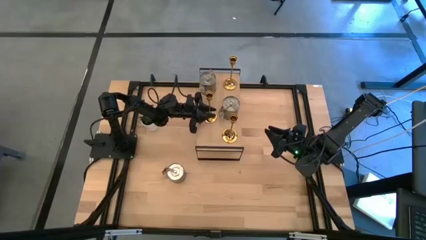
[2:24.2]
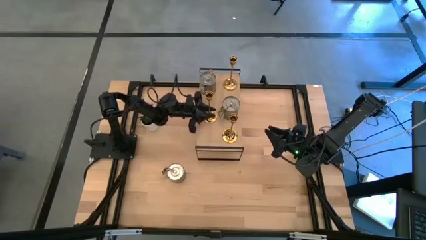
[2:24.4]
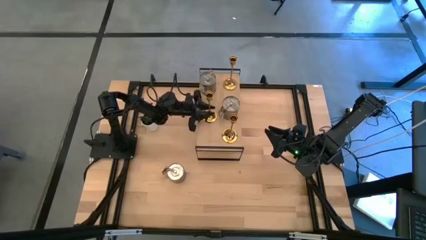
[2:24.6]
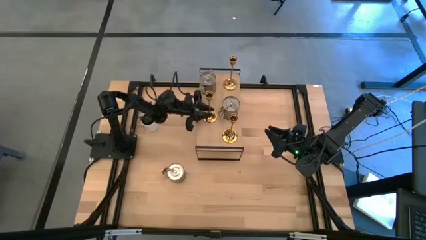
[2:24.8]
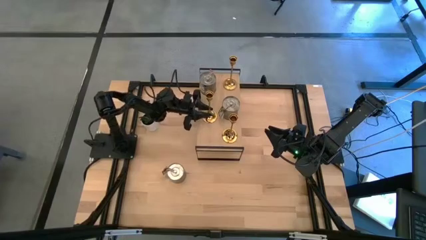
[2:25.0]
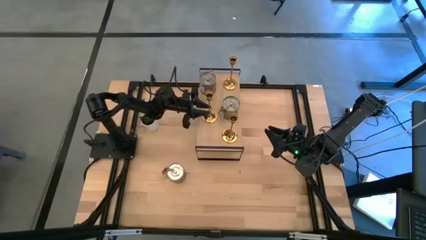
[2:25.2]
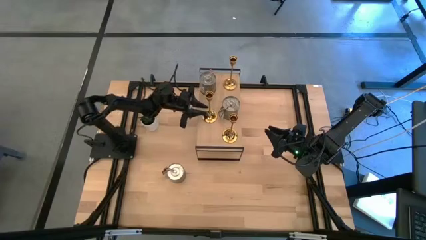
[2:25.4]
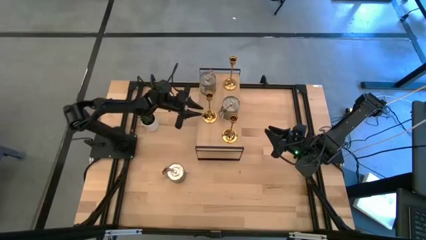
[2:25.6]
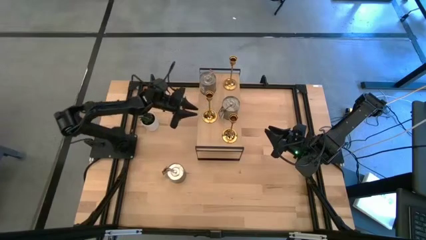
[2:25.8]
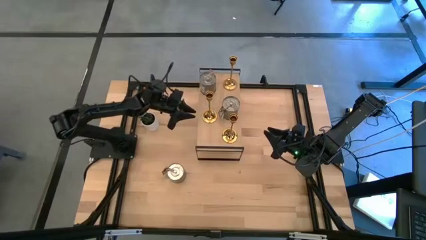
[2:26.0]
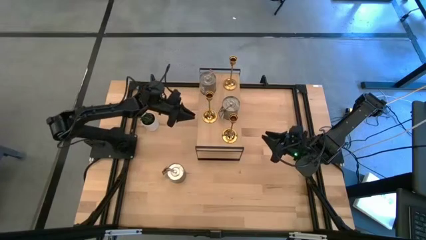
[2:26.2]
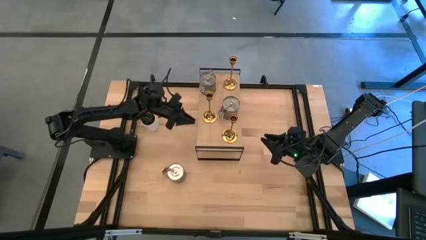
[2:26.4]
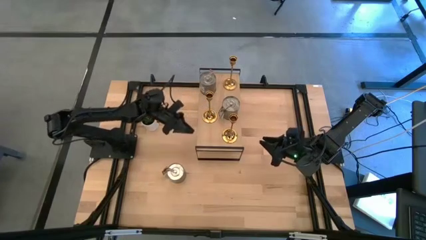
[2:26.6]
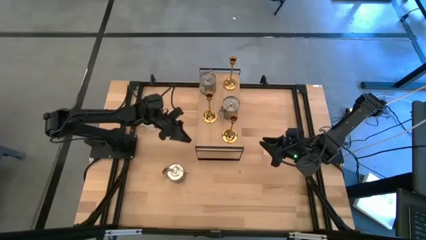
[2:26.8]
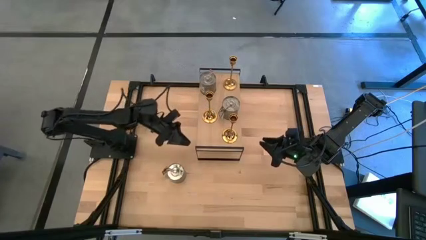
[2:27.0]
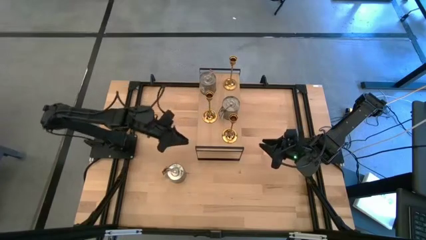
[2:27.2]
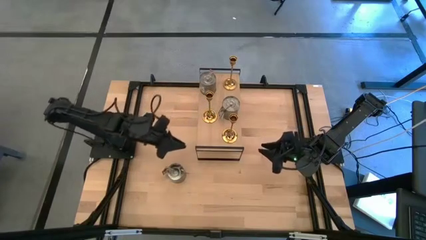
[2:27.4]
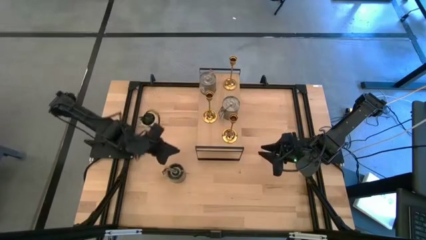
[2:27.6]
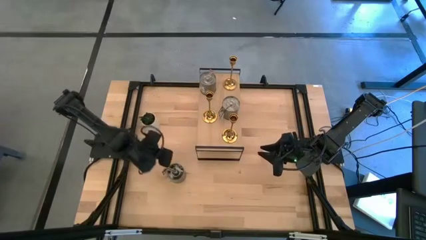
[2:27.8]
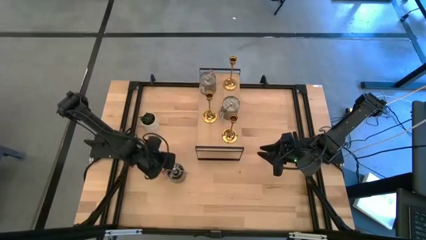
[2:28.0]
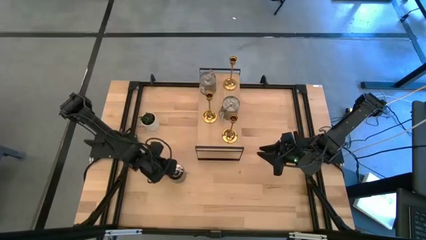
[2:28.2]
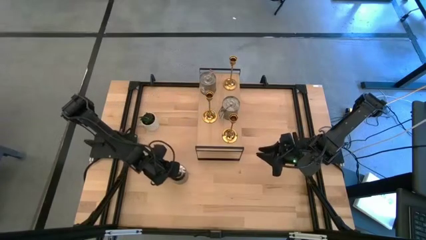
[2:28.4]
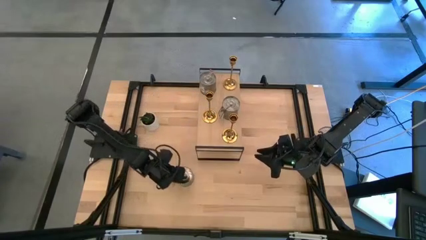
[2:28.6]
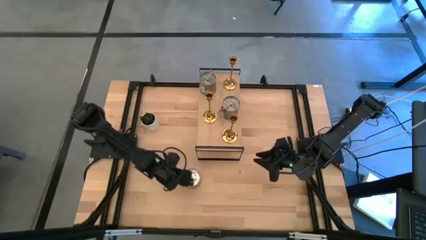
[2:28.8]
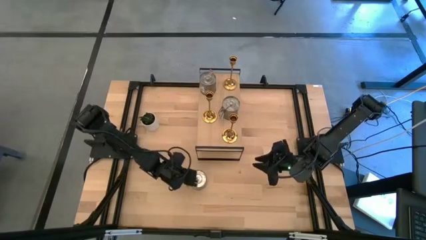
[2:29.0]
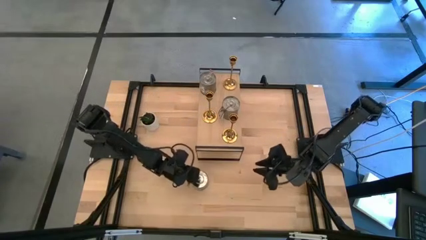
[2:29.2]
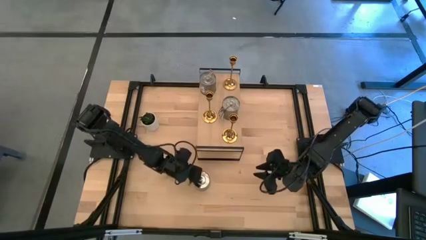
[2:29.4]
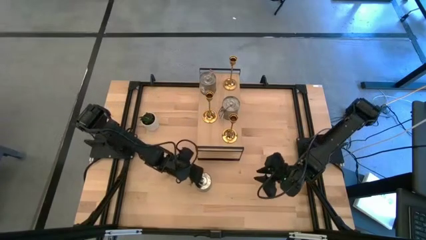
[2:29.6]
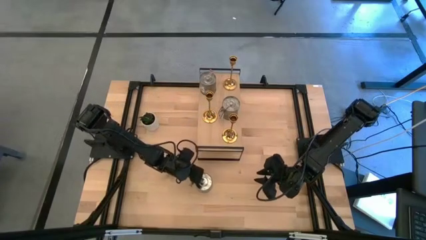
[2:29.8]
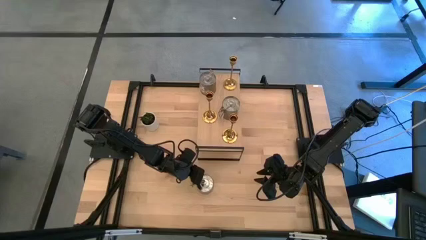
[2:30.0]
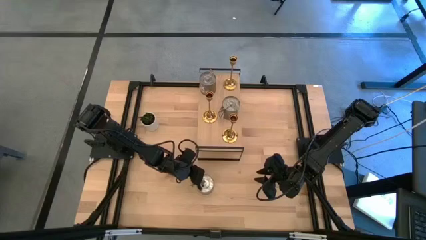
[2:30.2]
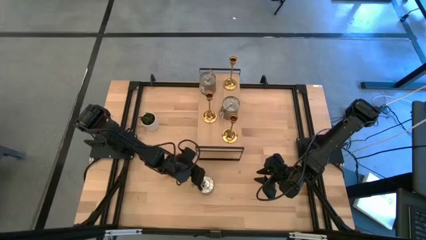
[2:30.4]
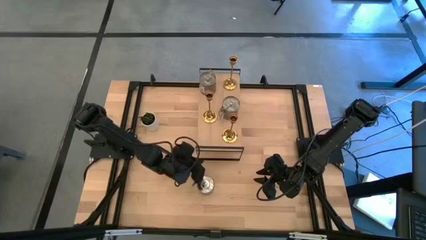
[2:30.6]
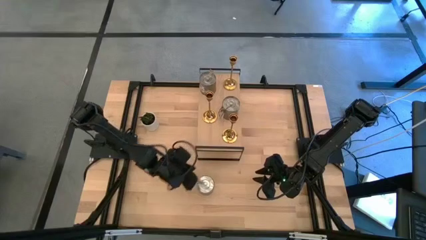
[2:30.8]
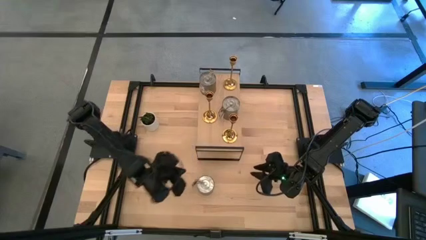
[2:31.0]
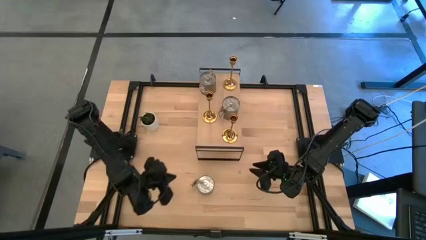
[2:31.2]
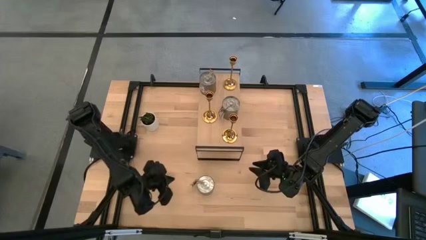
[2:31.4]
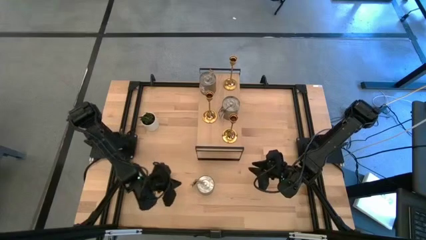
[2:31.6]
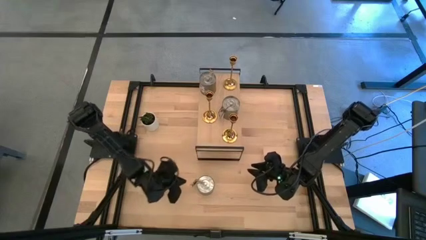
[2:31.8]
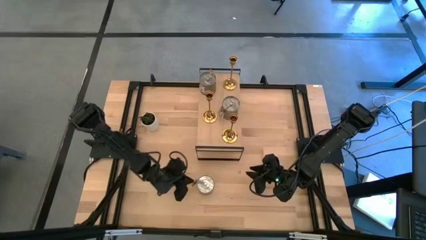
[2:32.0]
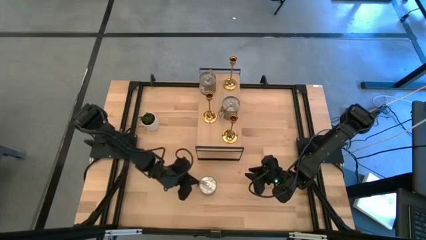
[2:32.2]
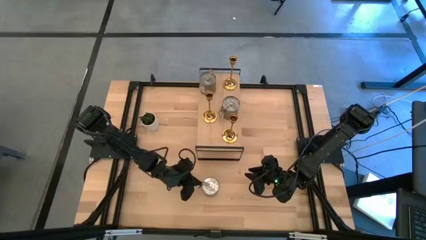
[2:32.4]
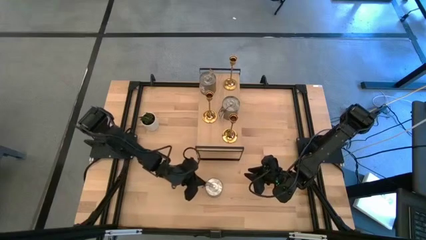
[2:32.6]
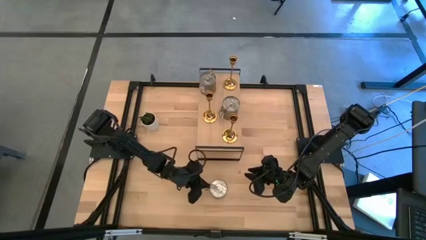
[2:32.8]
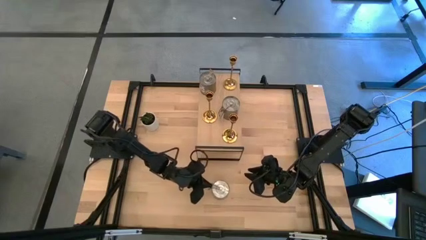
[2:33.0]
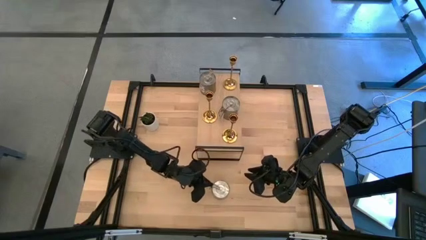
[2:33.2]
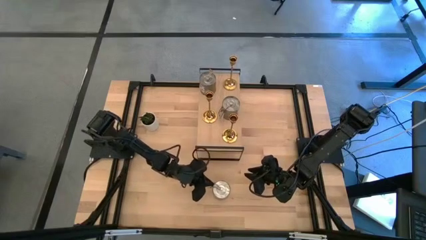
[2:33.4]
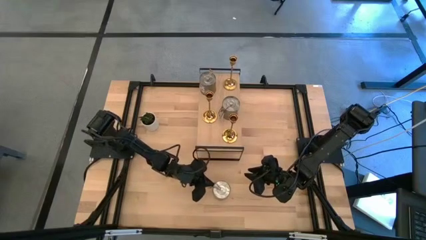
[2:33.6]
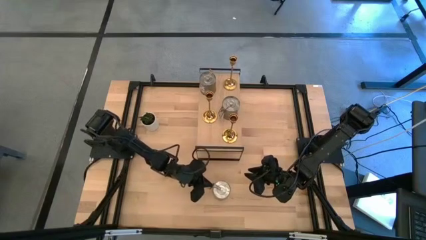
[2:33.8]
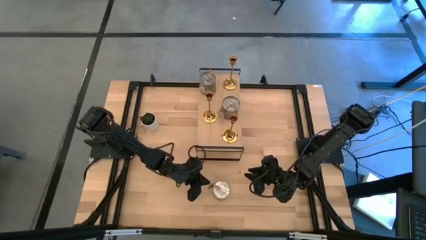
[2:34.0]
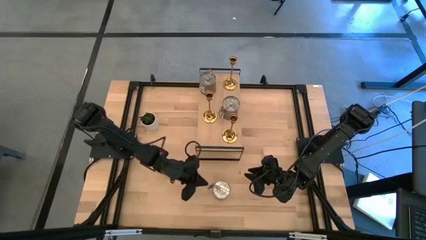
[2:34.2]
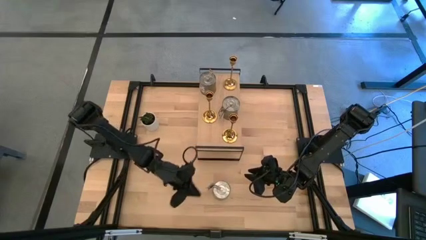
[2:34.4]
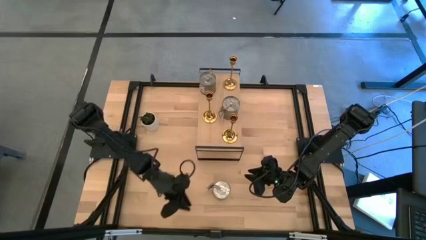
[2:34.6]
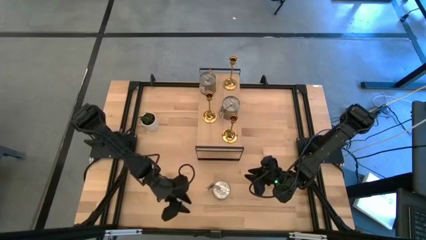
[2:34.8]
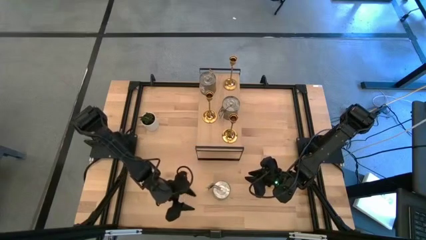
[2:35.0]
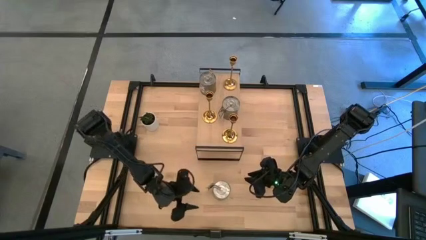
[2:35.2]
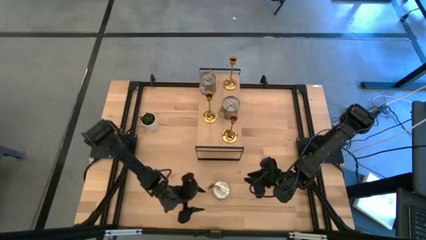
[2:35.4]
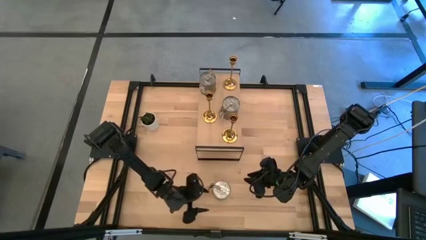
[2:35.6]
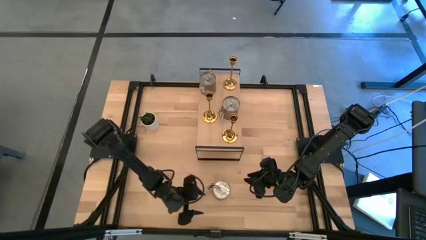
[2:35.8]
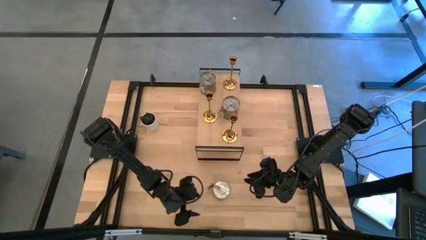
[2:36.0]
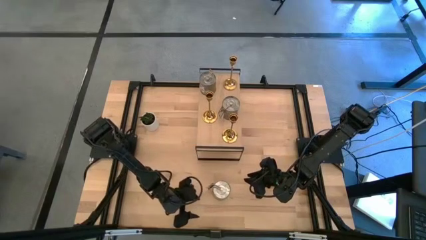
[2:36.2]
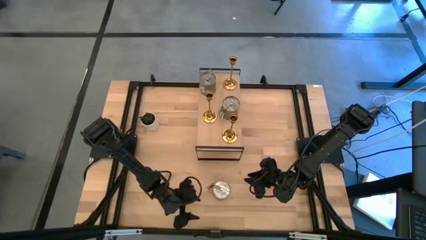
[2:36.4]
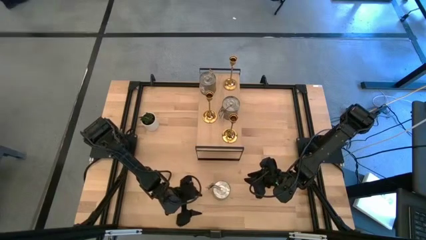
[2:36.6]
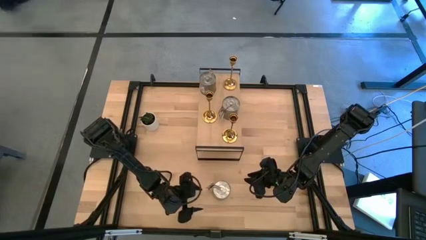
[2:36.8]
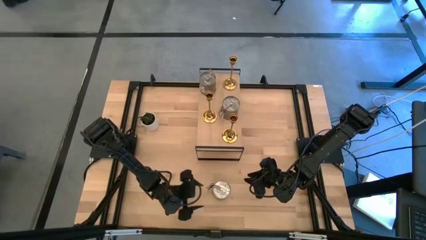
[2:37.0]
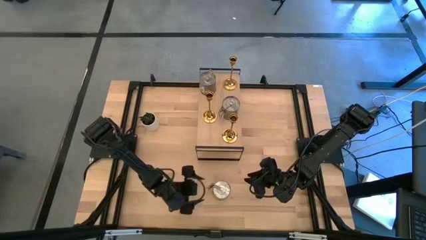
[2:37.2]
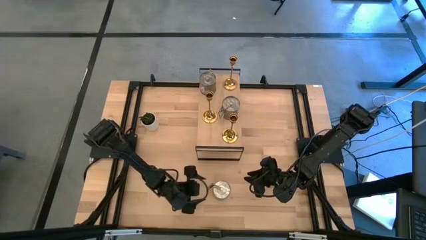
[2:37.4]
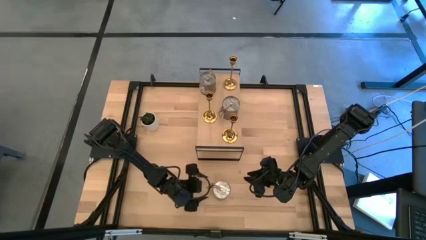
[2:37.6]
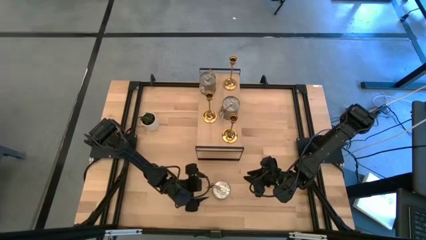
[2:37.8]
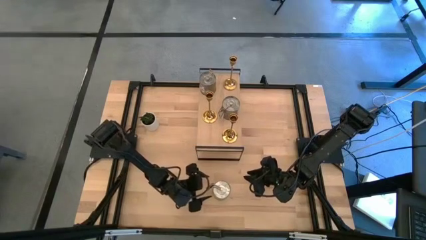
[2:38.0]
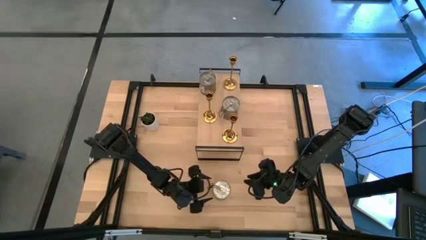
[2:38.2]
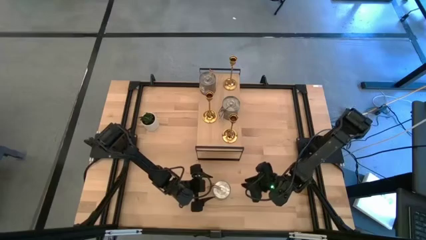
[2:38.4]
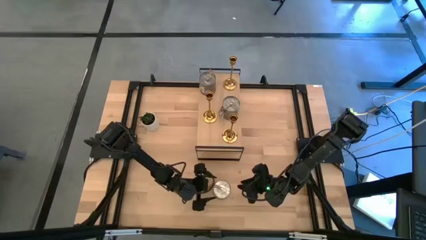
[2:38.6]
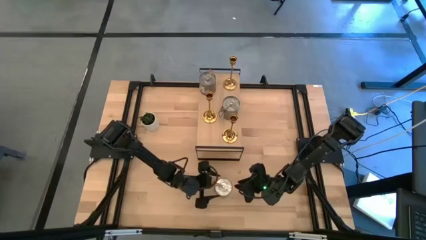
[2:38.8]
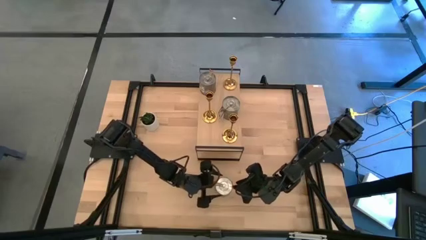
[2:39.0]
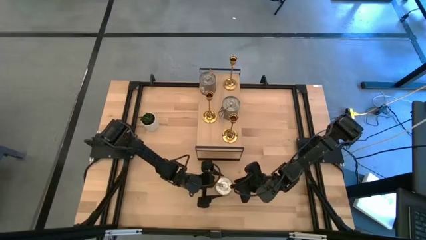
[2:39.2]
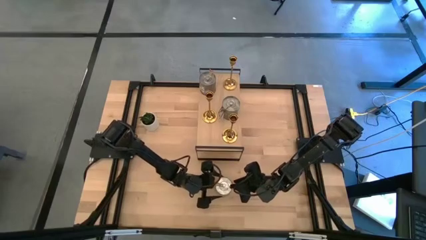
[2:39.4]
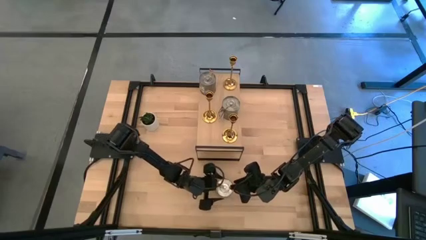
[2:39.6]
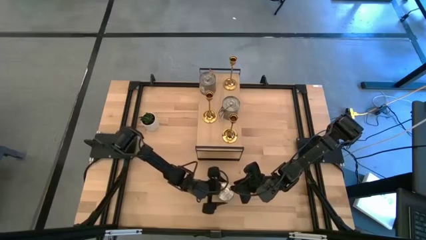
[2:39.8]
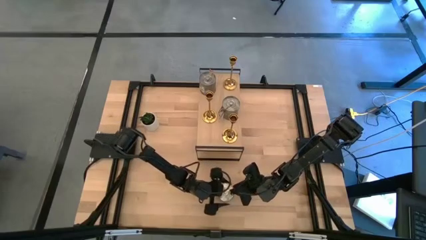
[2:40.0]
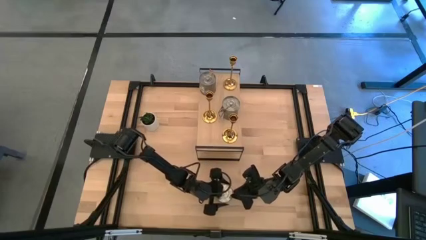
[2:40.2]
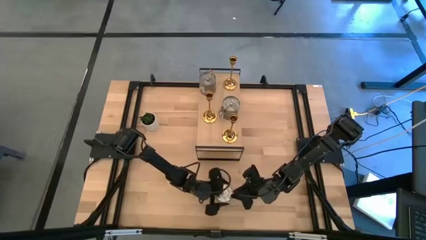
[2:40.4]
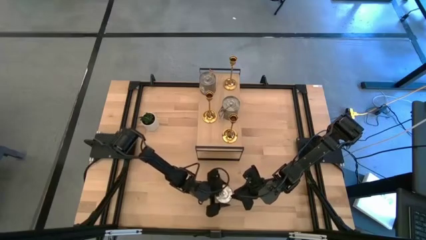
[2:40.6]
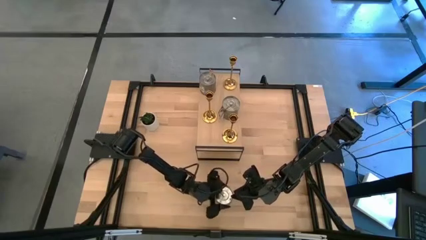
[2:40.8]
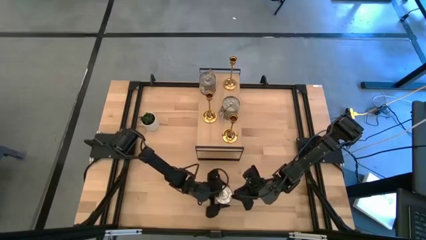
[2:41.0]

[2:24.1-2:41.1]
Task: Pick & Place candle stick holders
Put the silver scented candle on the shelf
